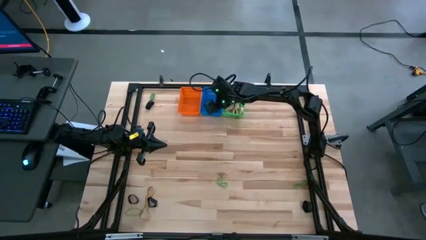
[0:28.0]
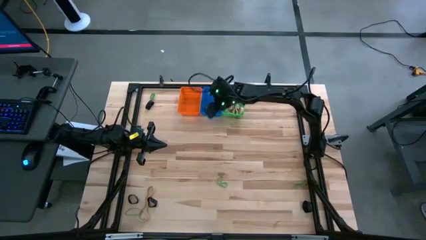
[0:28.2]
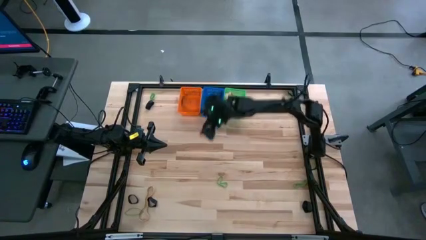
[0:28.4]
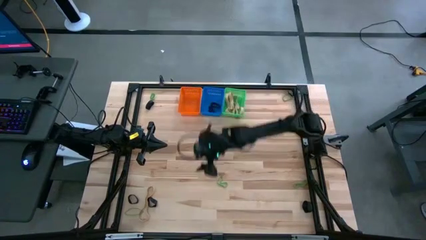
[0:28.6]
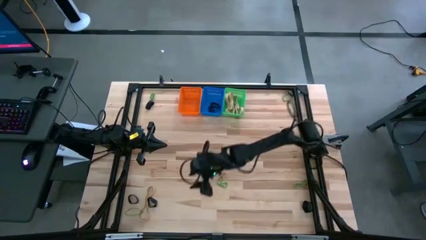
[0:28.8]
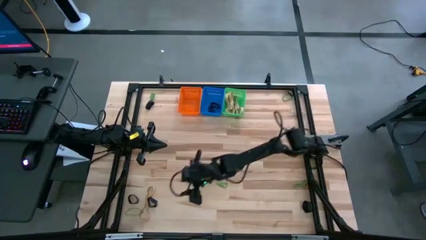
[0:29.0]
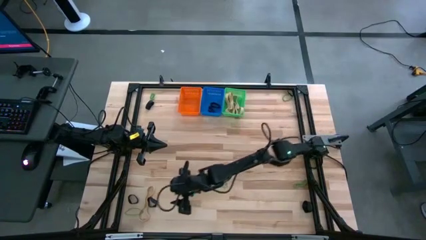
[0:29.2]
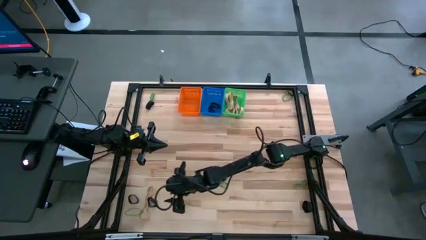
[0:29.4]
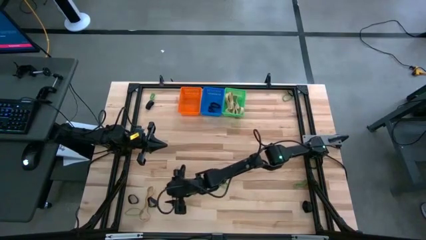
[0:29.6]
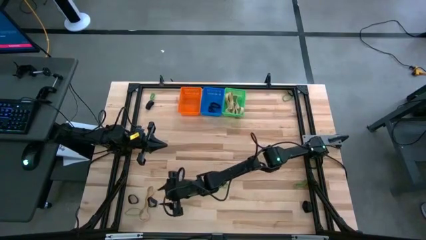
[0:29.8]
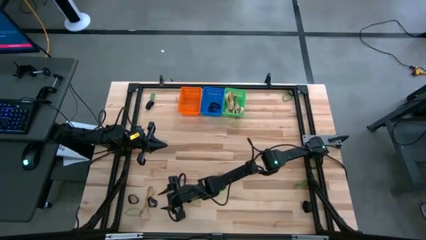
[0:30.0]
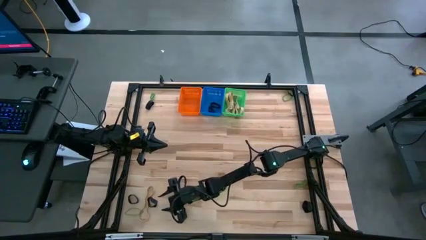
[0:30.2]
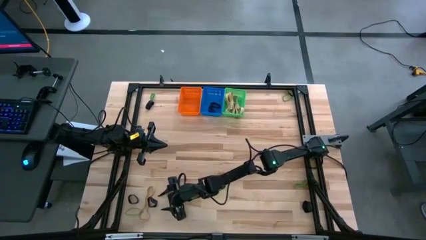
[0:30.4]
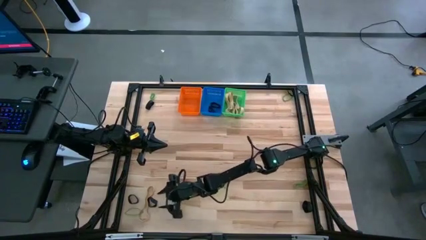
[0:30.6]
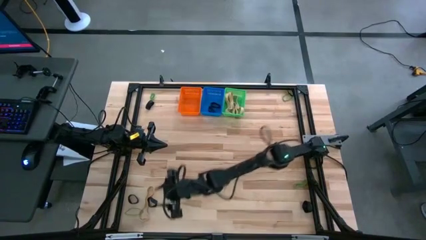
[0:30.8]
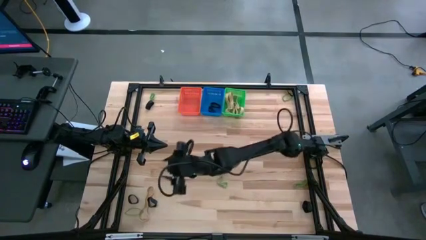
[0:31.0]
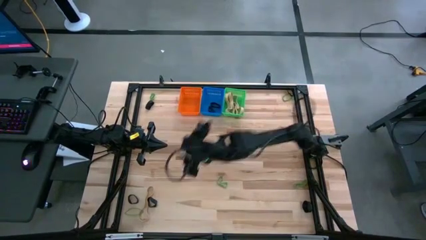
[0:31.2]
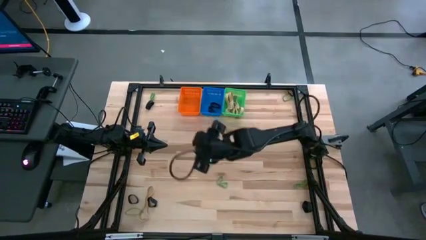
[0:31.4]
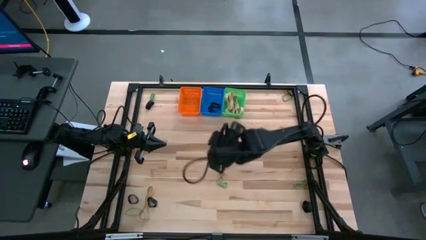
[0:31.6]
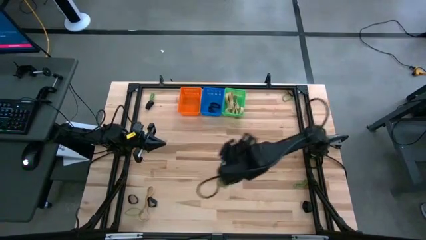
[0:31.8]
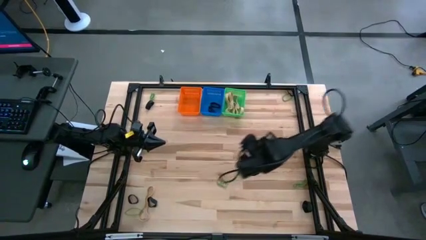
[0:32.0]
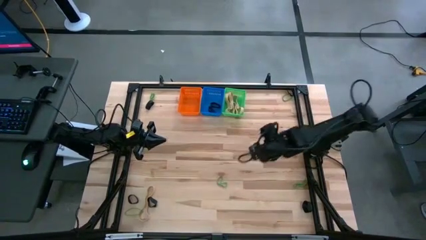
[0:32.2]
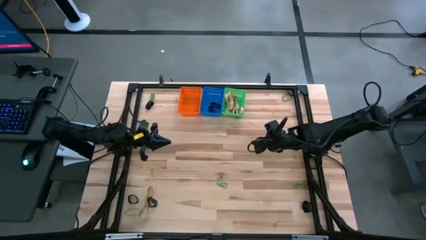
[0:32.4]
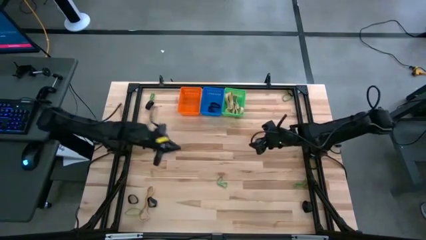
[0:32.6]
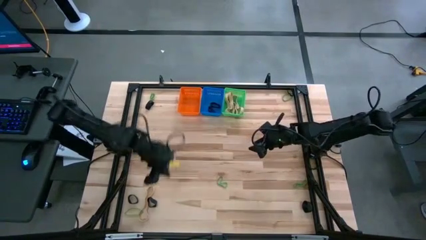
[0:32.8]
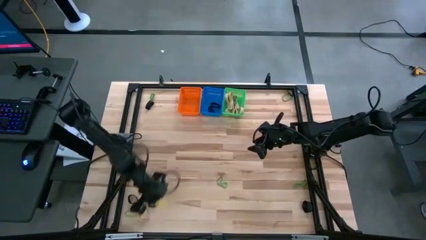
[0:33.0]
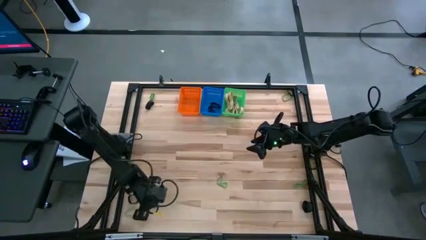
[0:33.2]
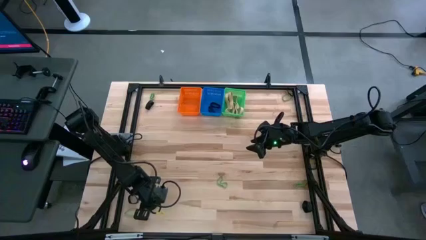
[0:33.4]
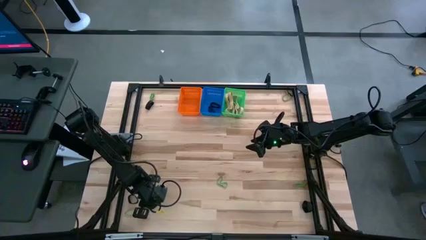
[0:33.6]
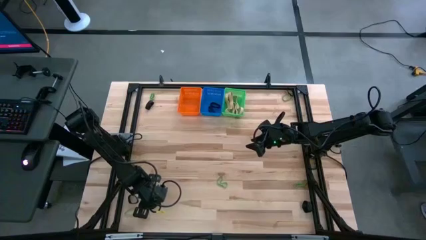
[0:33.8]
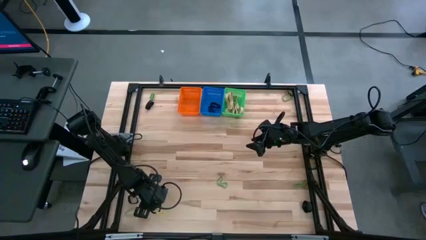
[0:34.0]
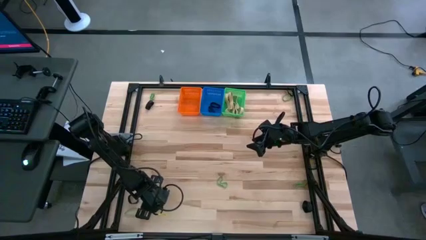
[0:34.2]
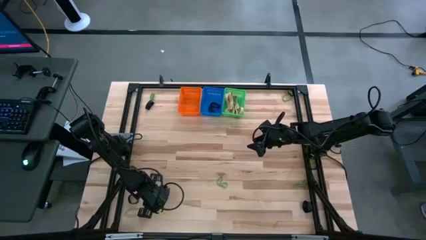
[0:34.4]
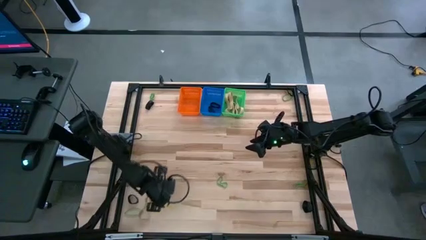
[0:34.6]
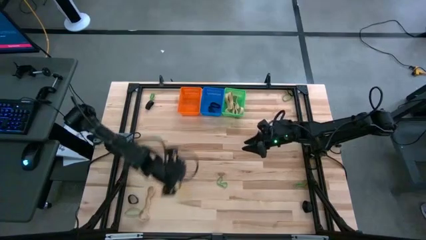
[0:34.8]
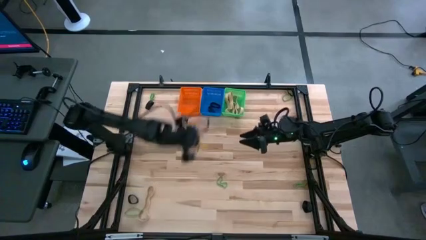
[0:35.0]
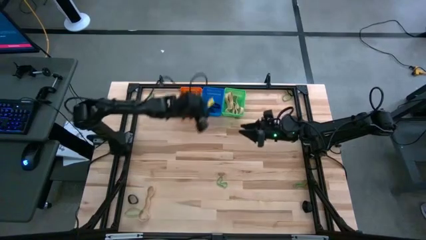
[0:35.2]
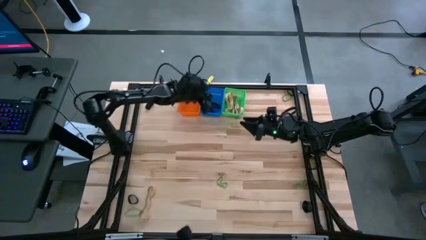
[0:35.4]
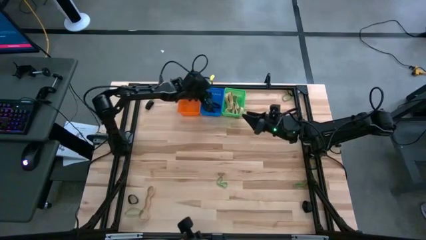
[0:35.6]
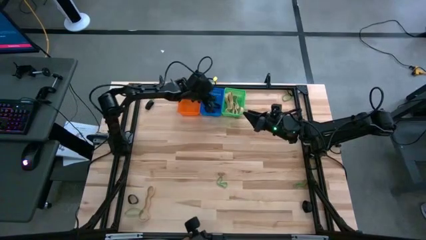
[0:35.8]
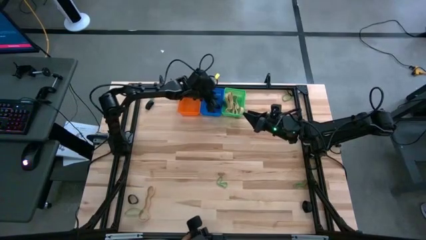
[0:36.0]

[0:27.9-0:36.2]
Task: Sort rubber bands into baskets
Put the black rubber band into the blue bin

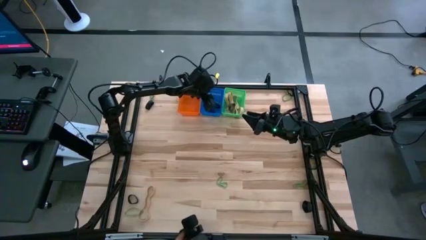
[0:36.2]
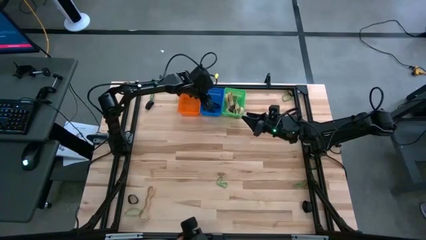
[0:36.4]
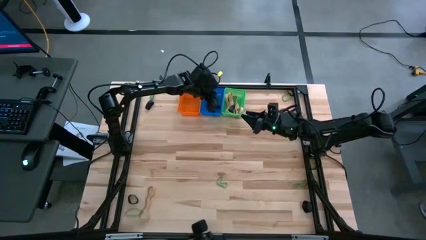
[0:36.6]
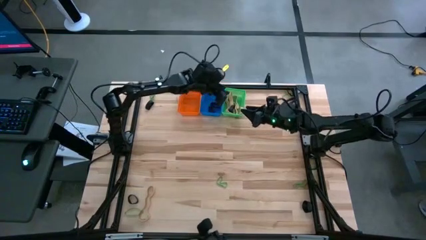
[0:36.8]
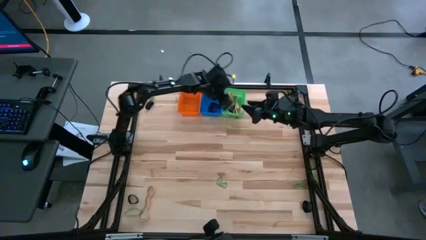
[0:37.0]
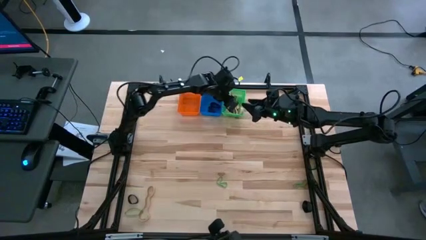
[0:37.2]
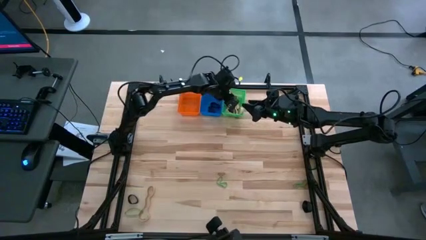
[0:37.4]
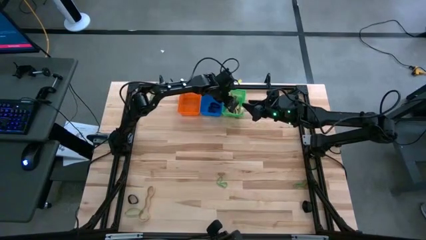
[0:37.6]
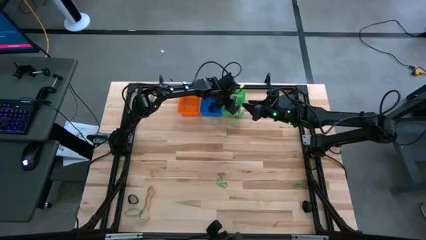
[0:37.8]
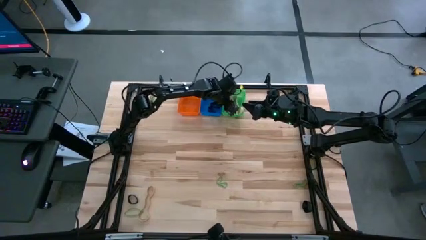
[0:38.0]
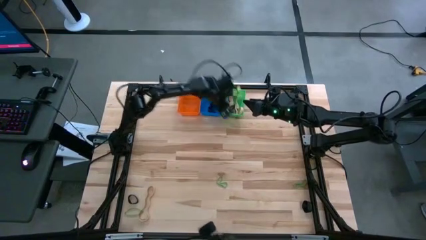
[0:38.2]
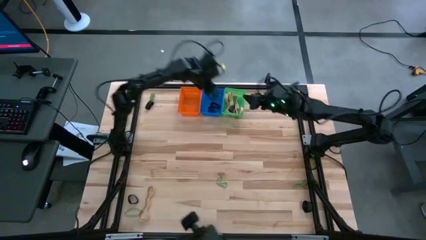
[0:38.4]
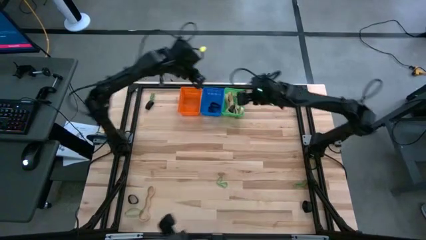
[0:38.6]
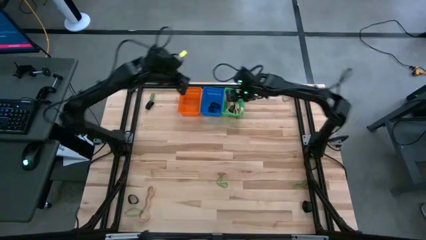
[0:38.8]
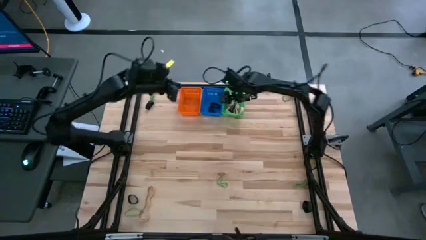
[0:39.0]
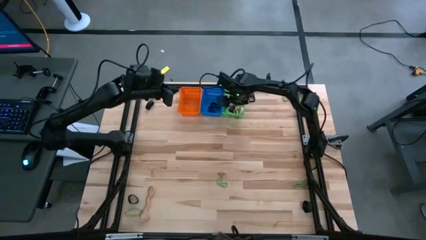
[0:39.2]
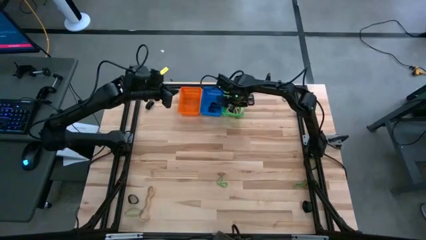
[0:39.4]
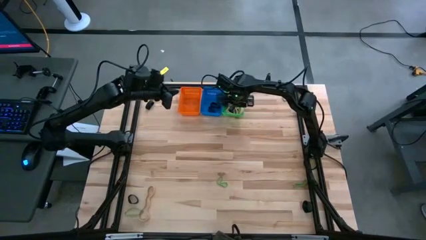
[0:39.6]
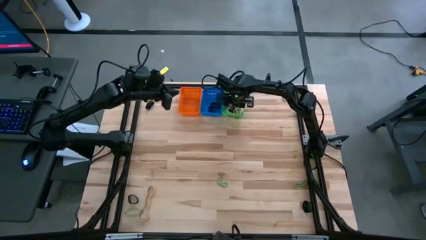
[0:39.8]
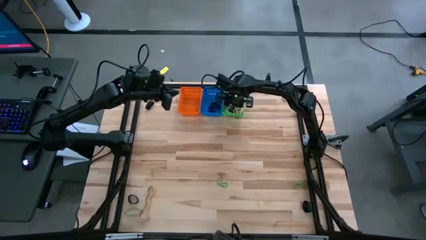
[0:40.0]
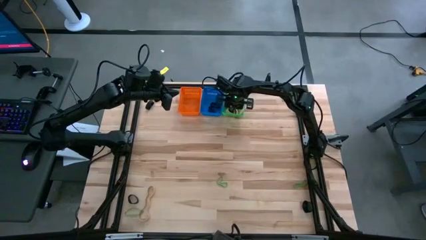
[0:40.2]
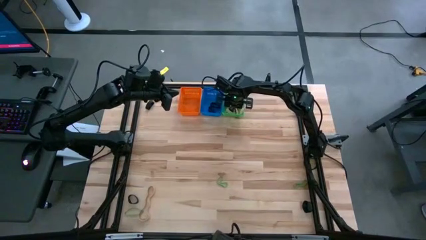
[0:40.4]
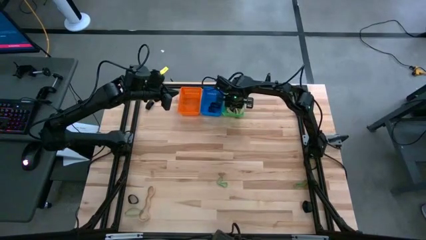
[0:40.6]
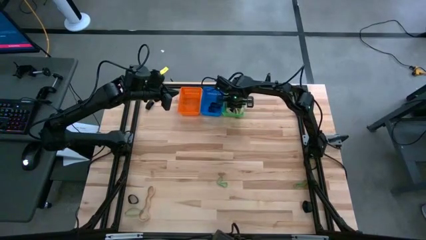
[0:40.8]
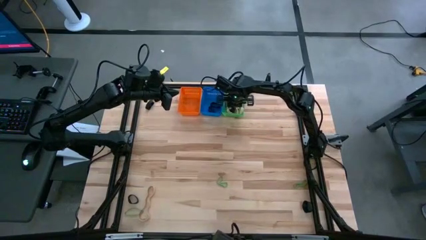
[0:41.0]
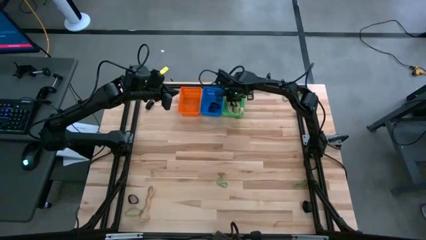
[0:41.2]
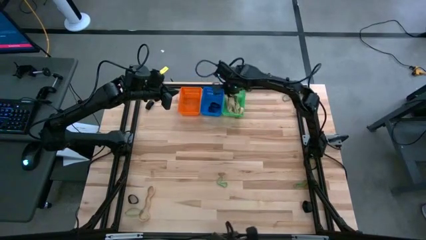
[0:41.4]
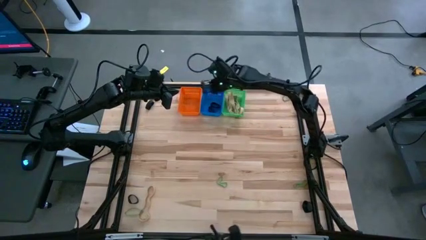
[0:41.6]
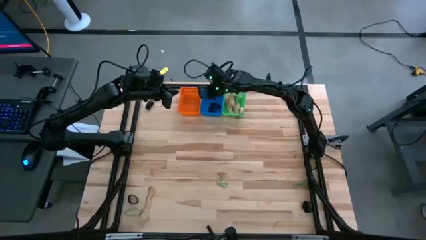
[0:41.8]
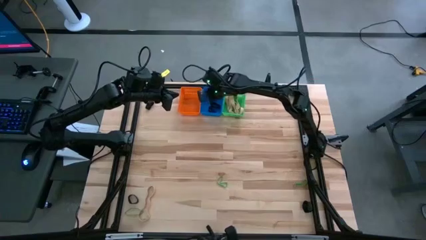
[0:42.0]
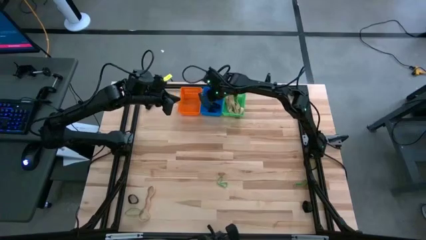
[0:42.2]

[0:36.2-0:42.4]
Put the black rubber band into the blue bin

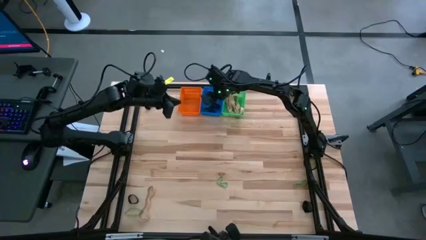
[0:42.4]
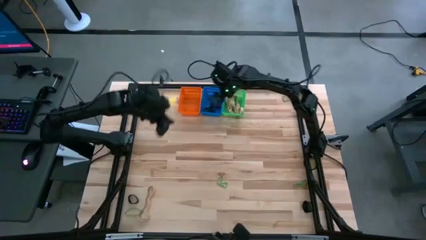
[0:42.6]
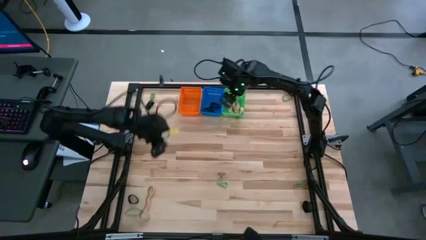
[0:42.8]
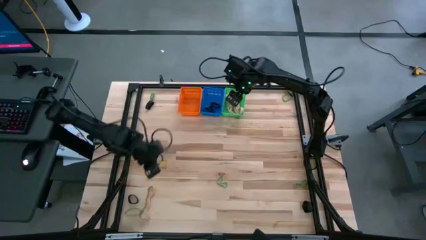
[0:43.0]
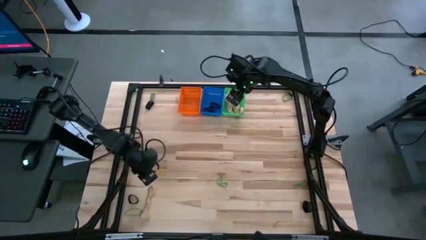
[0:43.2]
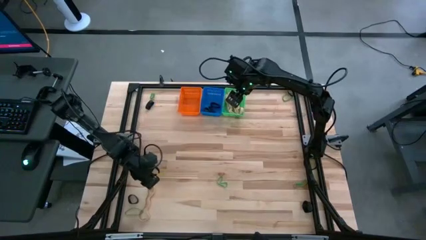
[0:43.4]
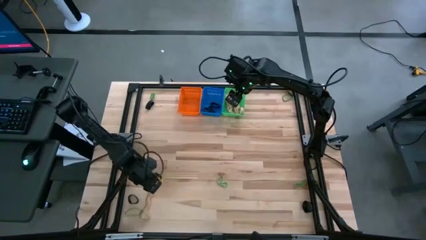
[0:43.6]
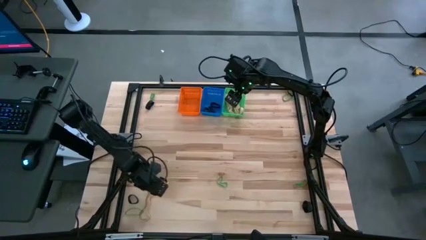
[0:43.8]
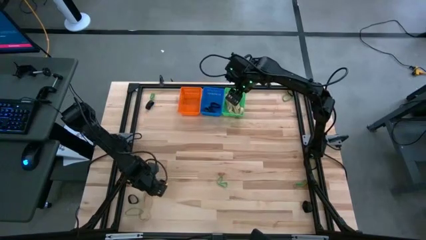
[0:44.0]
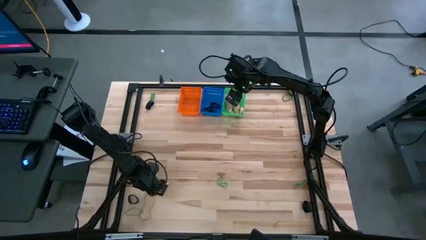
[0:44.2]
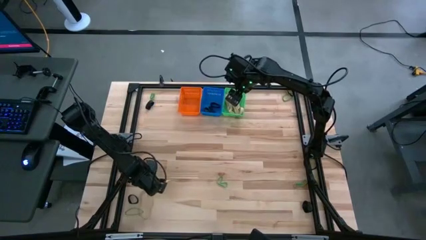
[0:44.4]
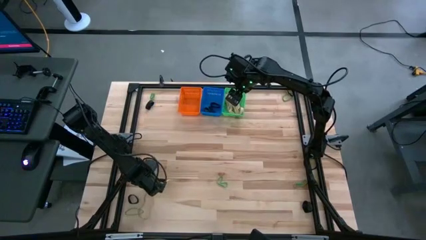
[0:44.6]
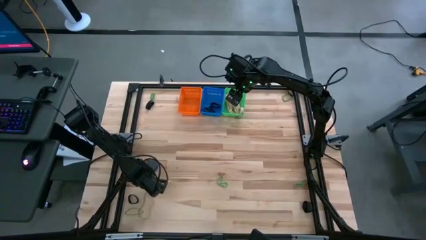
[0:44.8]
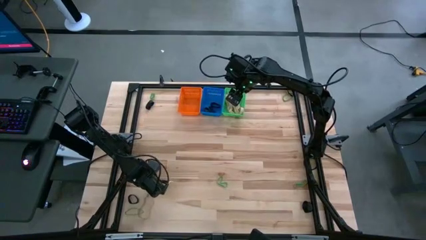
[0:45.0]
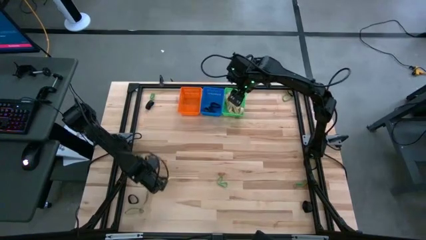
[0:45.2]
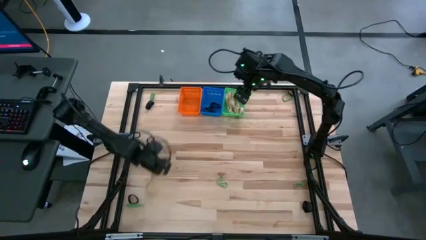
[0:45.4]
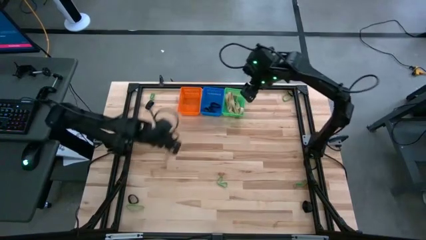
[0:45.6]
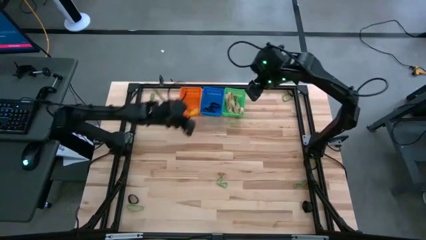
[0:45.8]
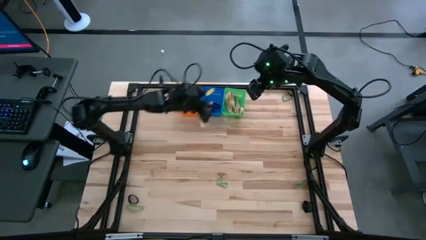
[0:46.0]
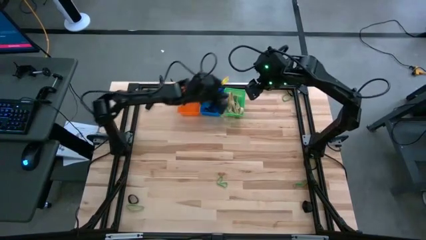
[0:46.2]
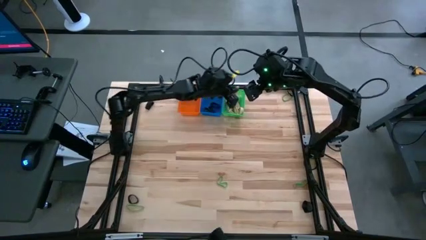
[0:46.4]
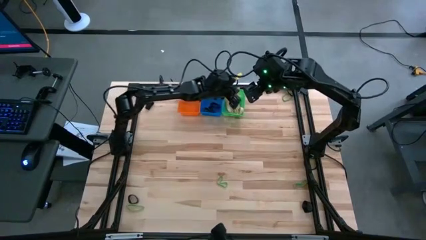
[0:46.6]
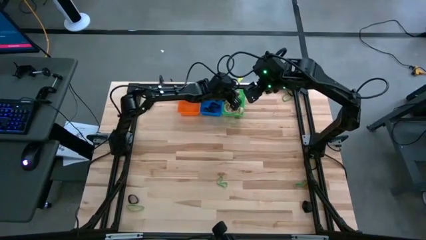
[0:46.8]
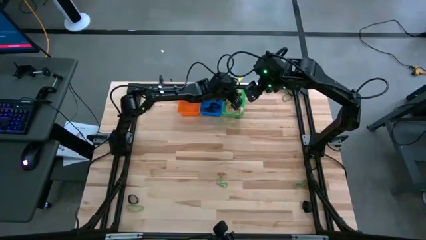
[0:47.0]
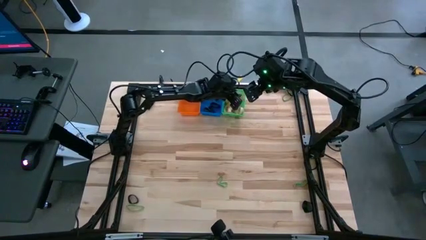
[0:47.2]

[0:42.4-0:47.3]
Put the brown rubber band into the green bin
